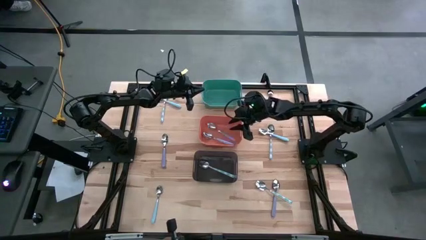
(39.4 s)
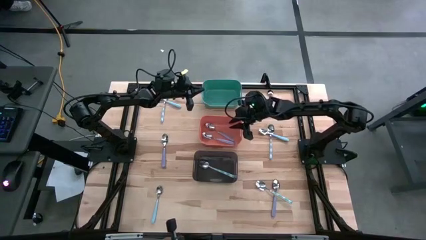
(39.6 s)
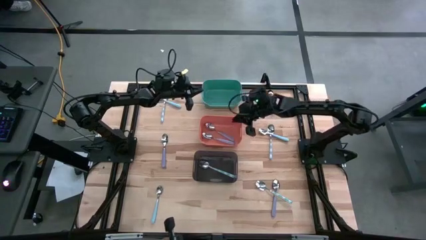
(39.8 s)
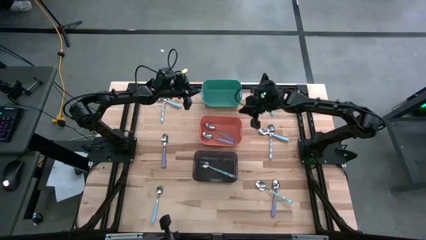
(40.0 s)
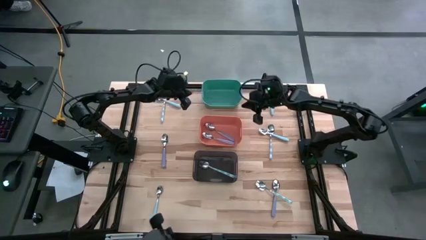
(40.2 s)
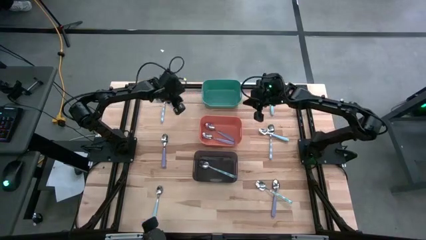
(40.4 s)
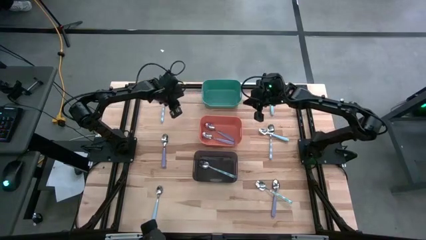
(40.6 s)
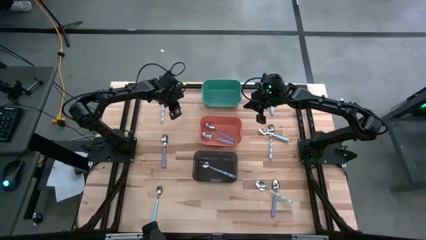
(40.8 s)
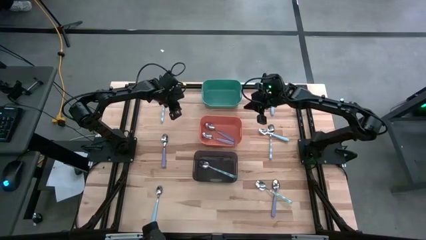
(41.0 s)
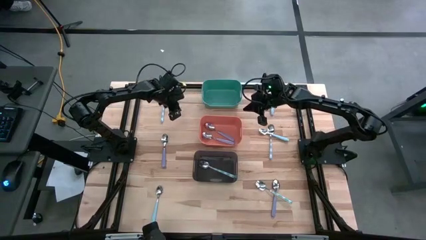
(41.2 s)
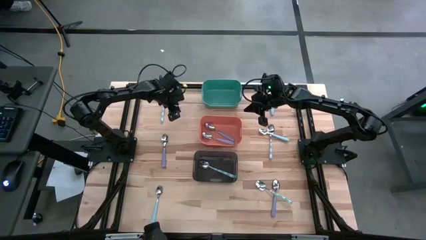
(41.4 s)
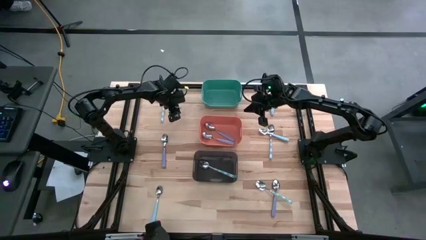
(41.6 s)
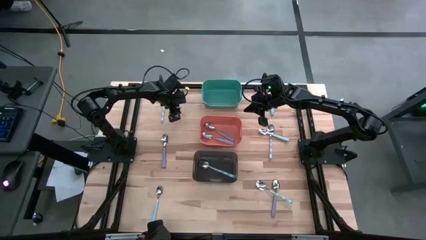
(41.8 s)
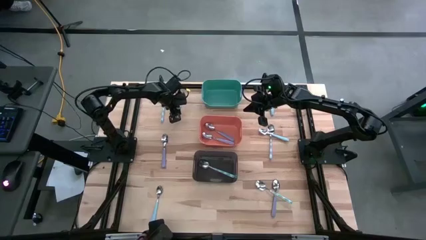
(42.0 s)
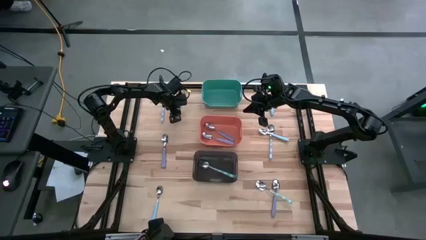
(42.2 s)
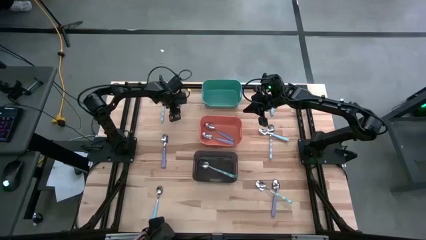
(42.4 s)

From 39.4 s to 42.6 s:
Task: Sort silverware by color (type)
Put the top left blue spoon into the blue bin

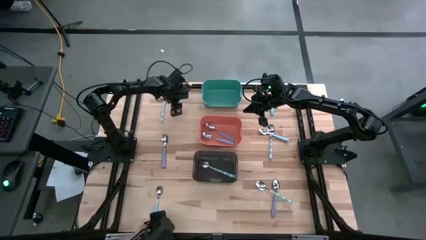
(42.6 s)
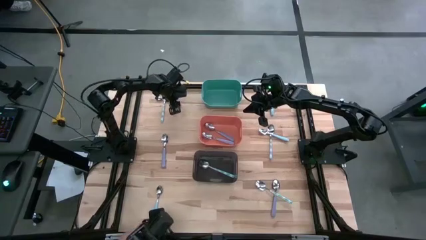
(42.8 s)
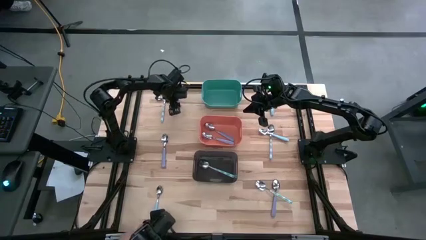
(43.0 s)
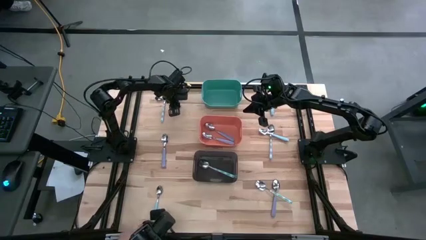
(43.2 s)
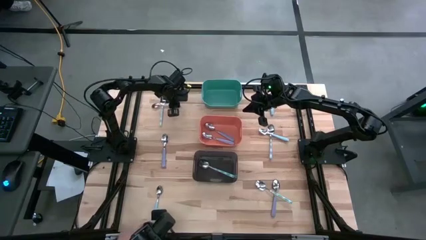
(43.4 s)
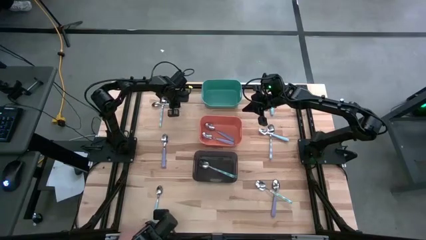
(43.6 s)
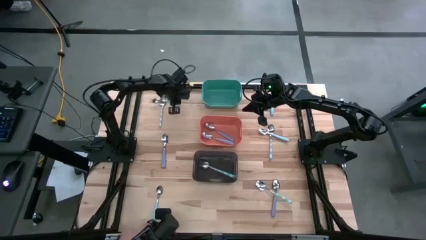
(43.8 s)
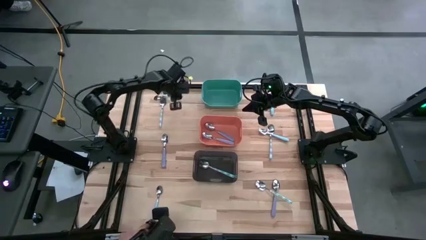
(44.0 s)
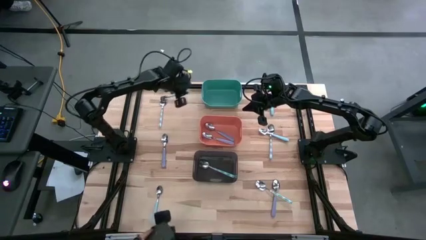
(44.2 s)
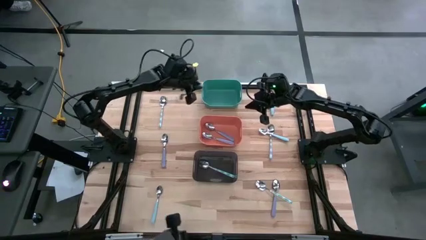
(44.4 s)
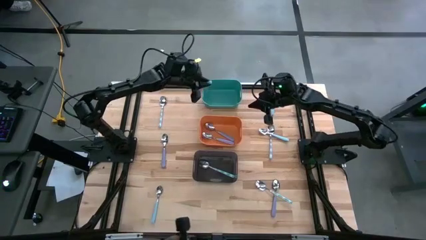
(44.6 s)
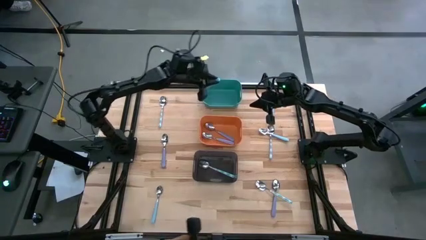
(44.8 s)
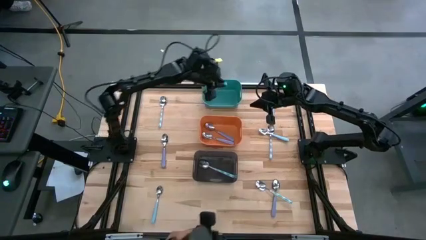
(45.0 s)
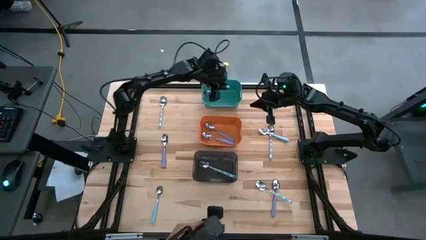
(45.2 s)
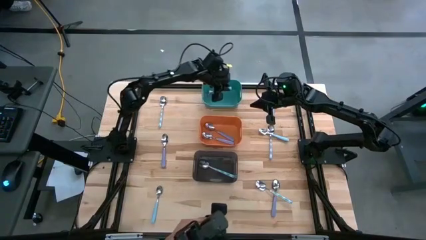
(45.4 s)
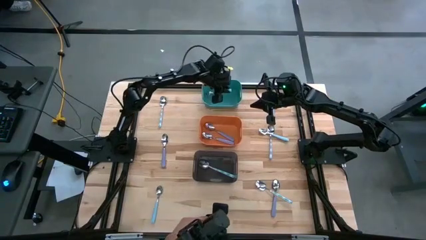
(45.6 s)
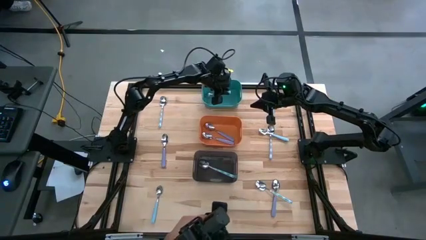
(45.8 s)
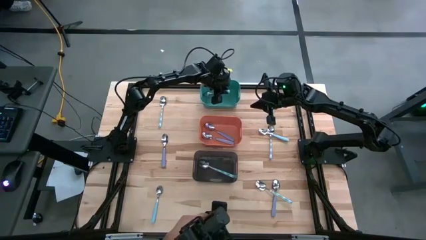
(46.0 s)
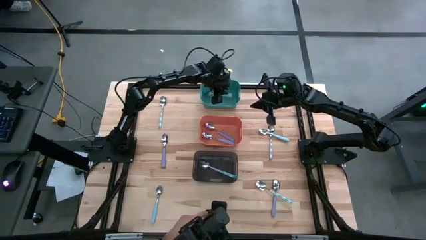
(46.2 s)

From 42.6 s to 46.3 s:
Put the top left blue spoon into the blue bin

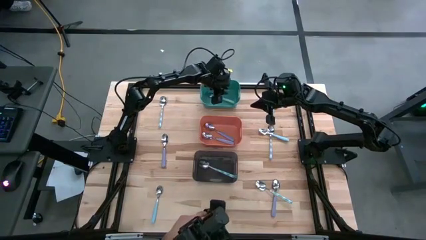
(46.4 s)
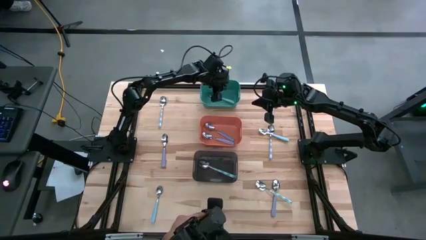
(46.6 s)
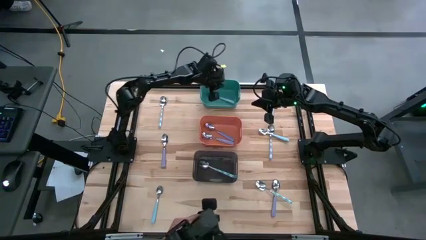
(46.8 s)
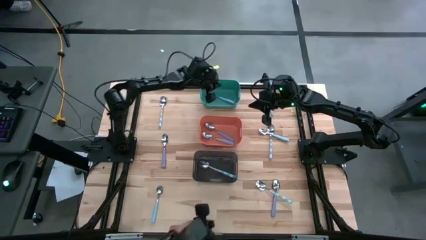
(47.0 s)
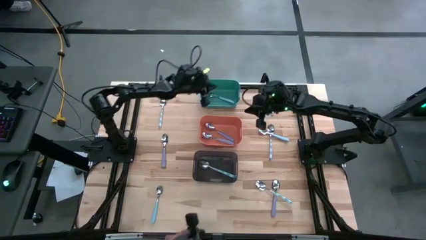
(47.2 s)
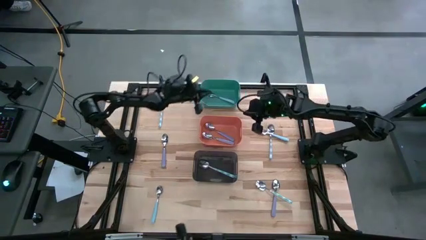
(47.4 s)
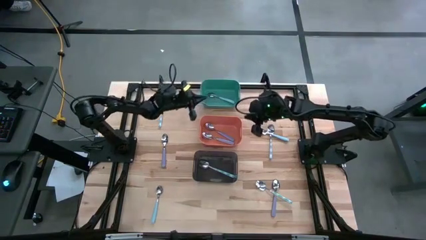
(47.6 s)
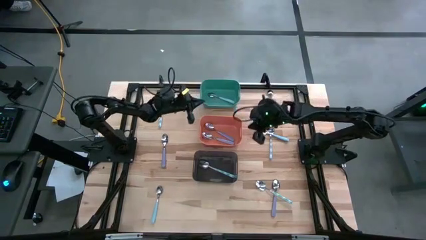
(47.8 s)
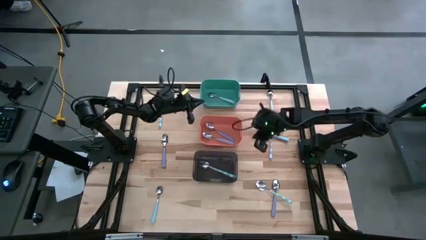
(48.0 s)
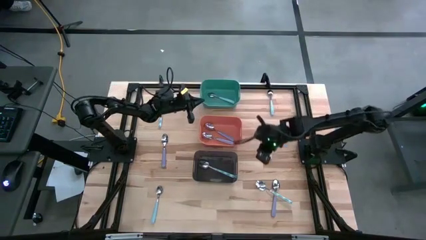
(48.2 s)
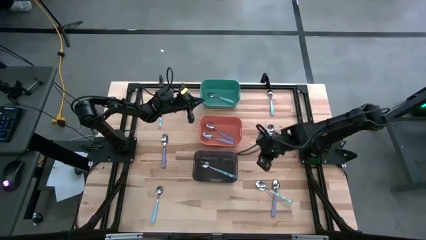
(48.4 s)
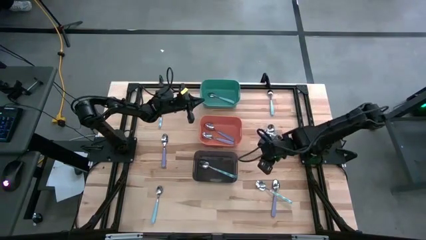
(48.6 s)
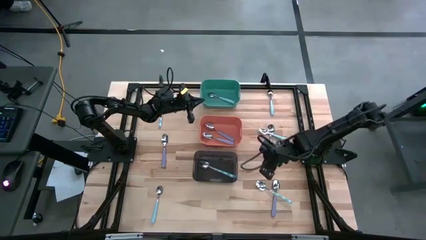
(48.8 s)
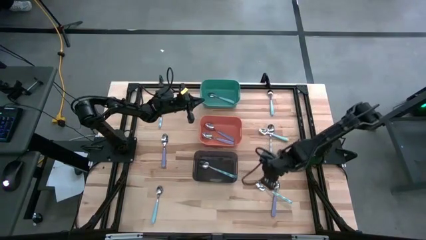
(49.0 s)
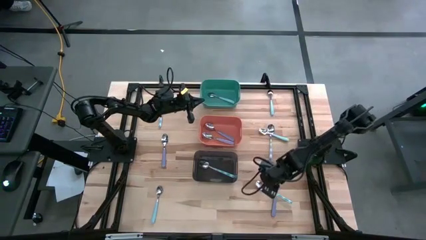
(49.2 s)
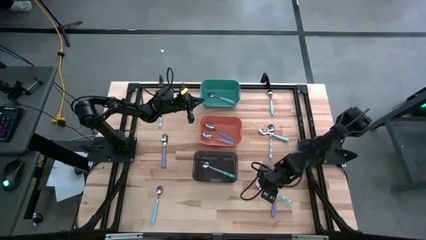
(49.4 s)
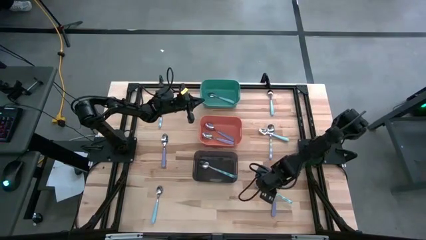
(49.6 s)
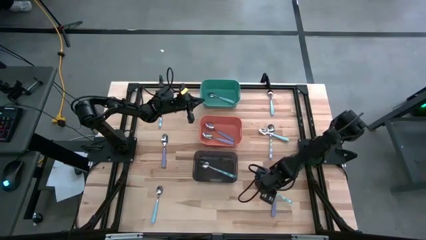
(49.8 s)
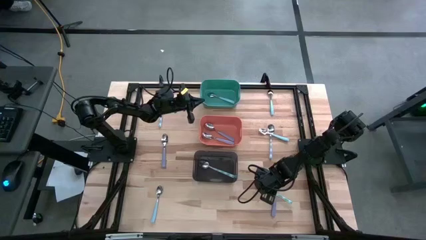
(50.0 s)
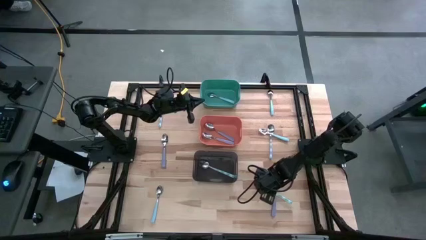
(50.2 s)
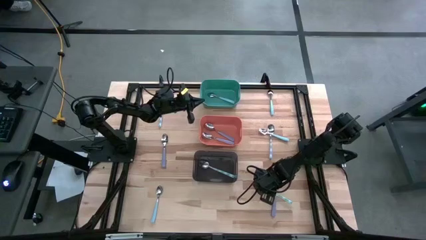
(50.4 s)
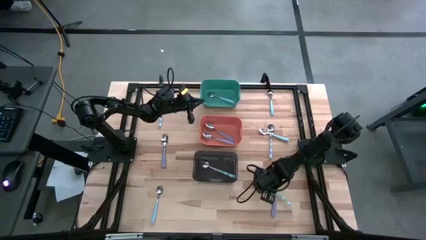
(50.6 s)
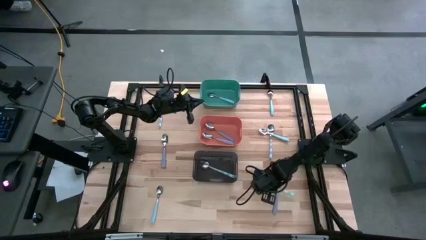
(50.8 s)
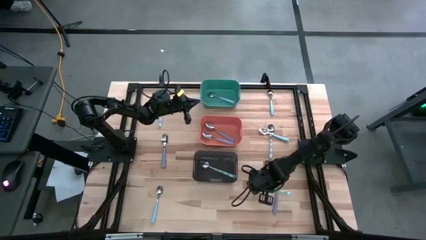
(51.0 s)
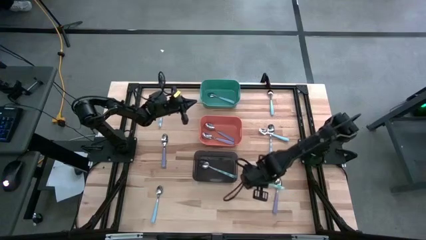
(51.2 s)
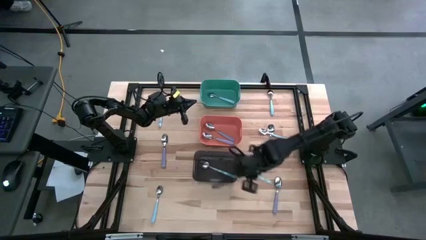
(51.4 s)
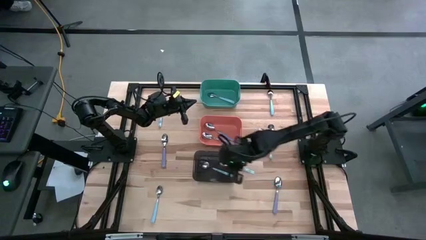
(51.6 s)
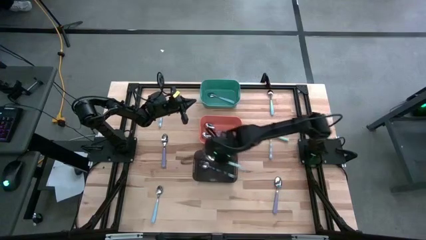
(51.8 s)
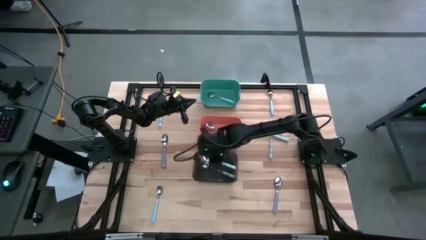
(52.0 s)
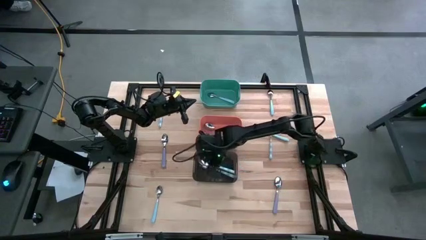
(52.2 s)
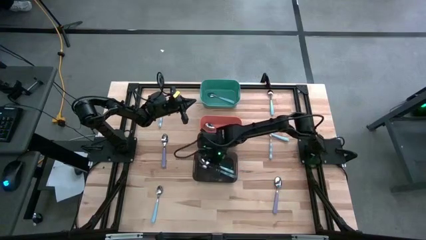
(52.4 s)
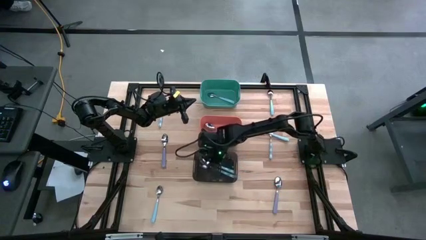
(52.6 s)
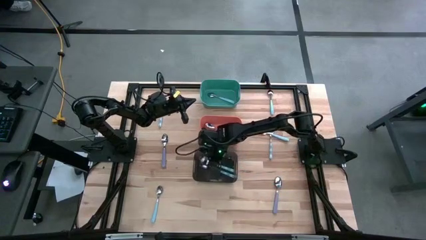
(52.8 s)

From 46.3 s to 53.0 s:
Put the bottom right white patterned spoon into the black bin

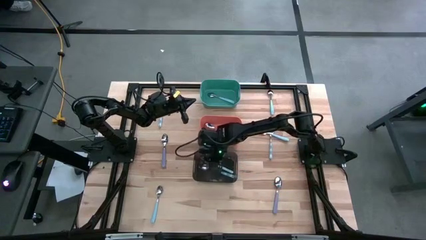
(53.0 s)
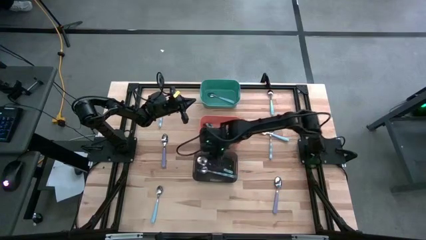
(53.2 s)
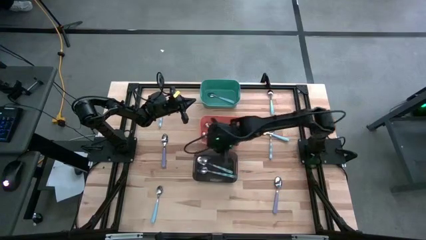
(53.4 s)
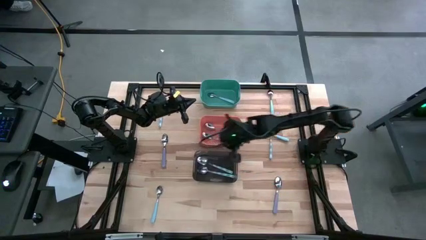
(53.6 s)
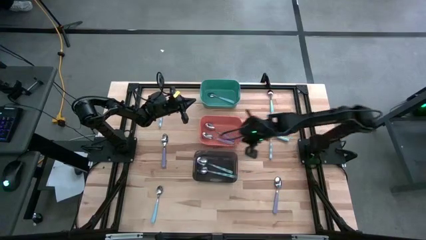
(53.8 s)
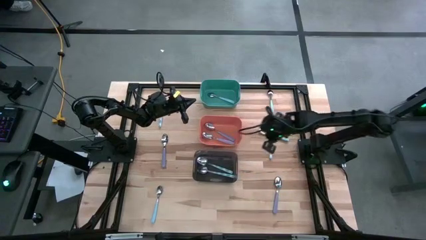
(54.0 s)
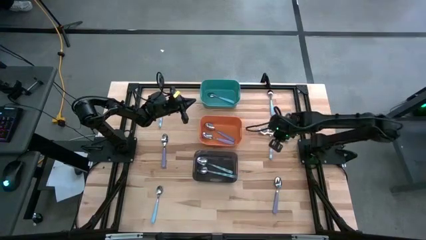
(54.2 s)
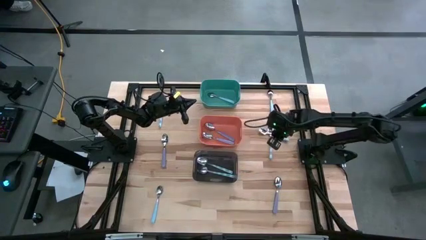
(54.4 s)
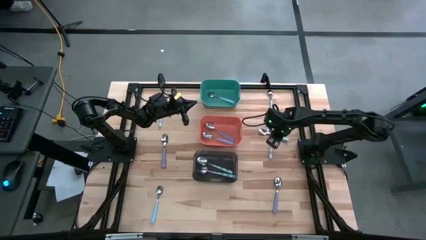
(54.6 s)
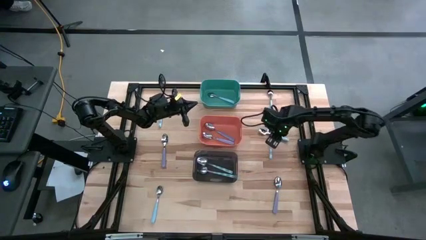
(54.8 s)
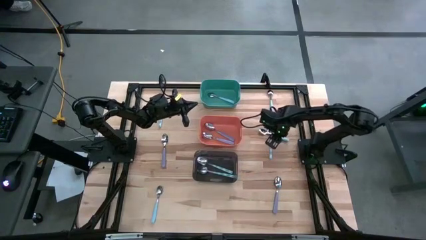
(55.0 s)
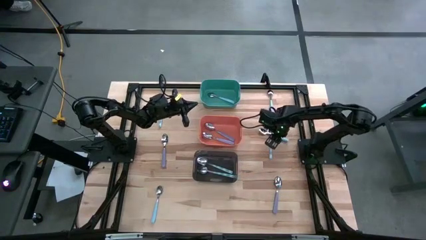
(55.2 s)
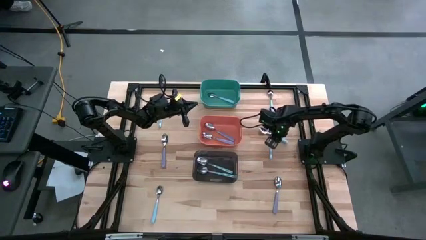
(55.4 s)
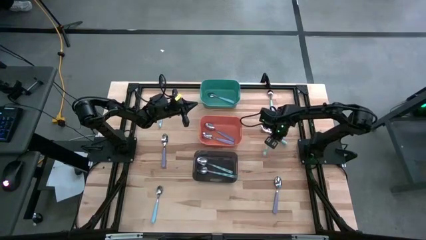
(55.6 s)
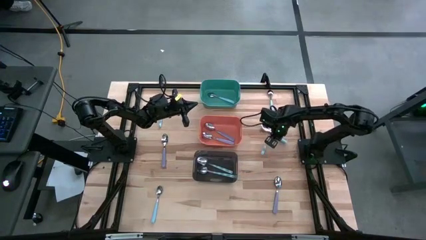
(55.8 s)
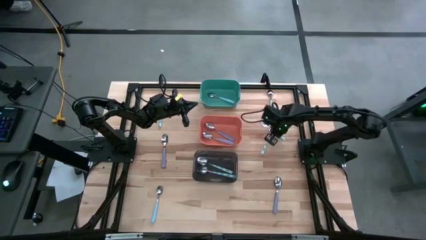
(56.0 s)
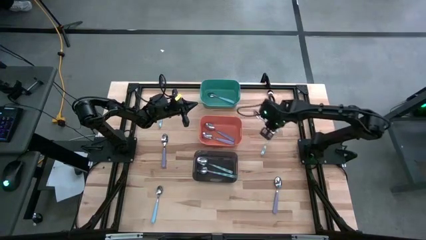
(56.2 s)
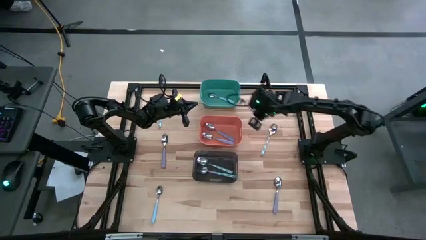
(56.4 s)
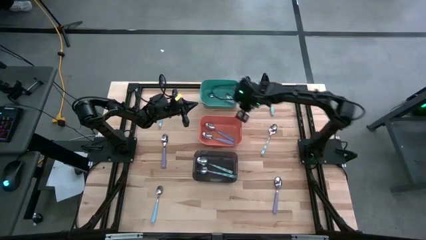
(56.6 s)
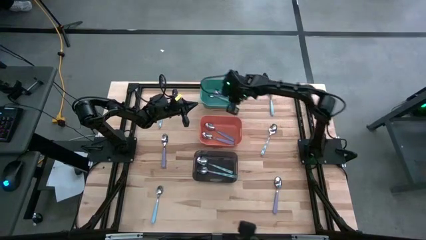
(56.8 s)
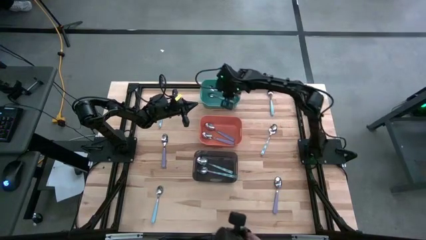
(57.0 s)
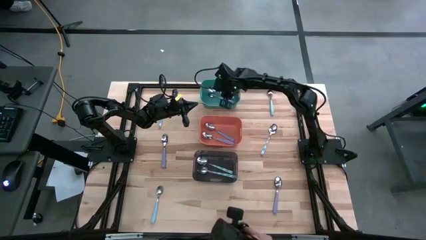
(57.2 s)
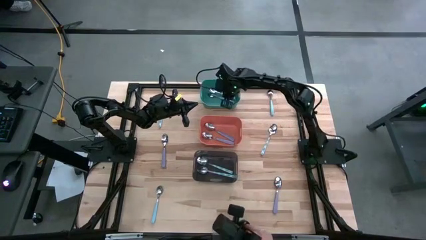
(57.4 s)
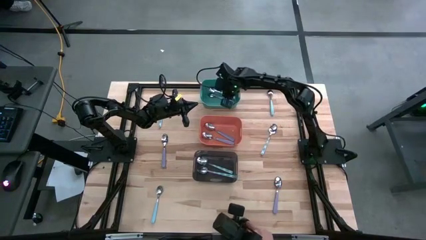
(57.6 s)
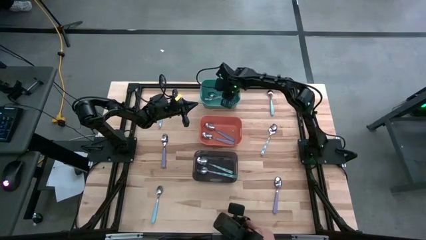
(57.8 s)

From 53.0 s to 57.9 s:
Put the middle blue spoon into the blue bin
